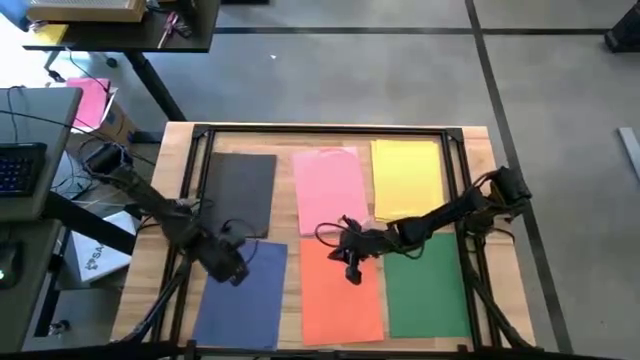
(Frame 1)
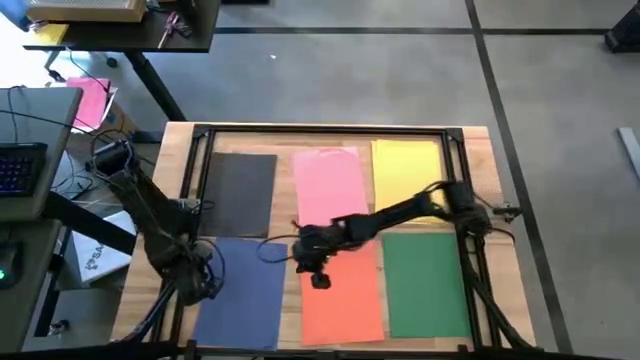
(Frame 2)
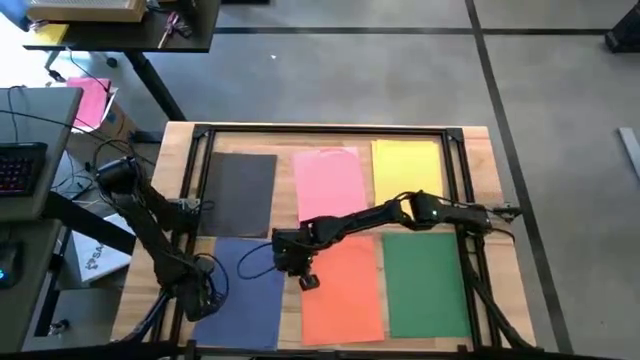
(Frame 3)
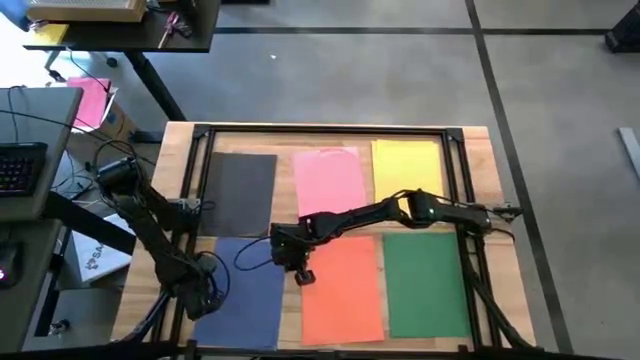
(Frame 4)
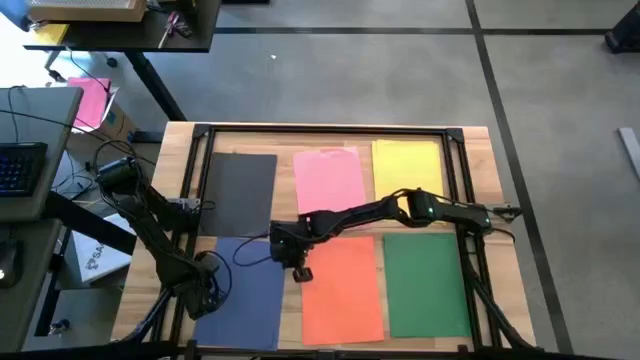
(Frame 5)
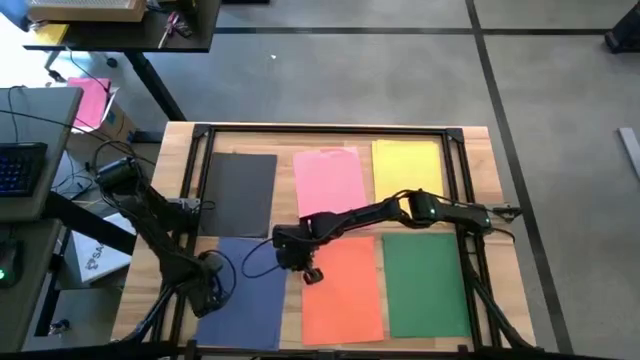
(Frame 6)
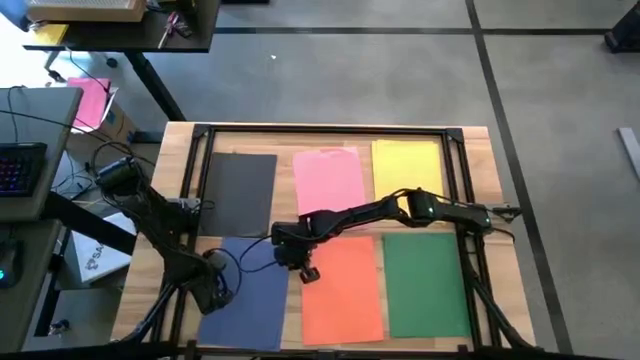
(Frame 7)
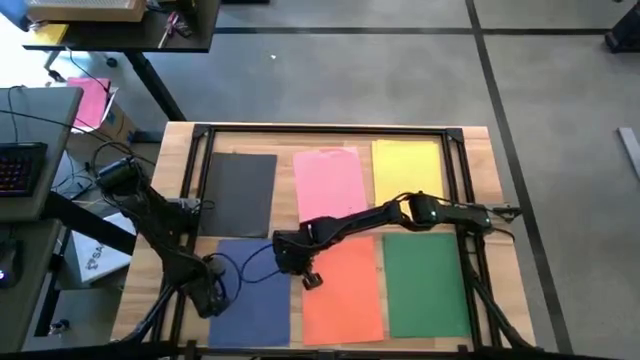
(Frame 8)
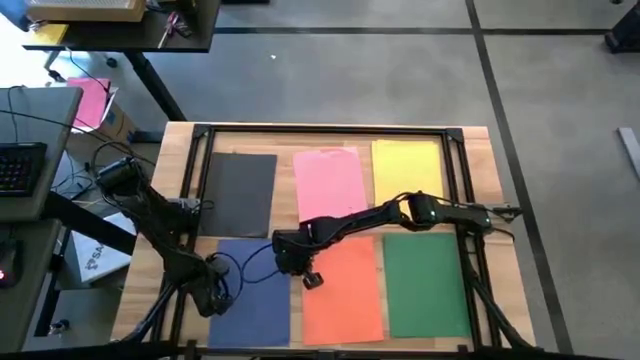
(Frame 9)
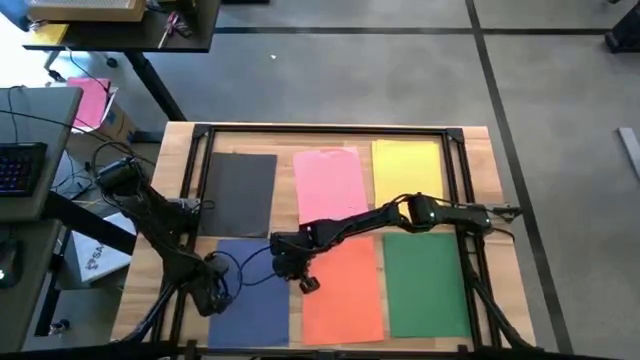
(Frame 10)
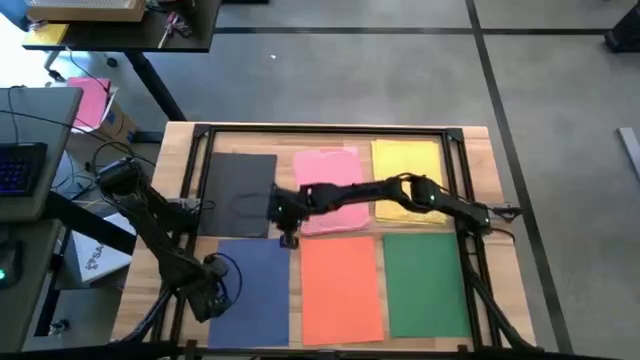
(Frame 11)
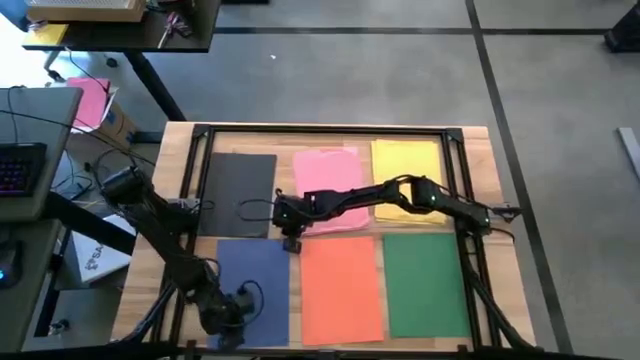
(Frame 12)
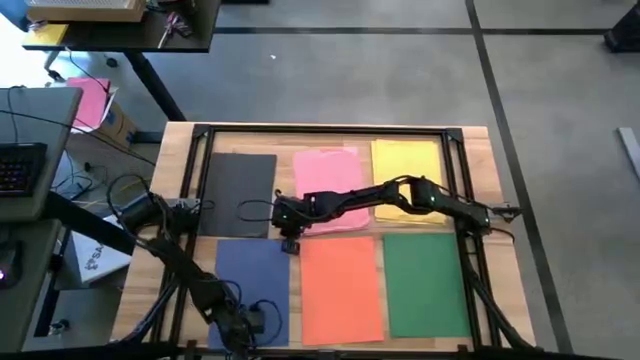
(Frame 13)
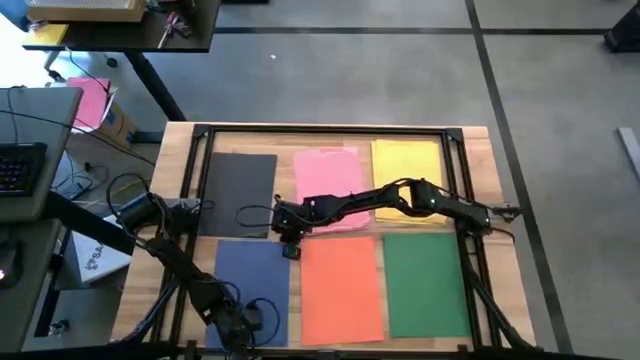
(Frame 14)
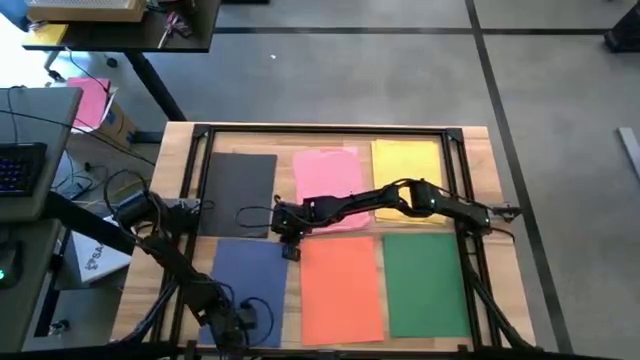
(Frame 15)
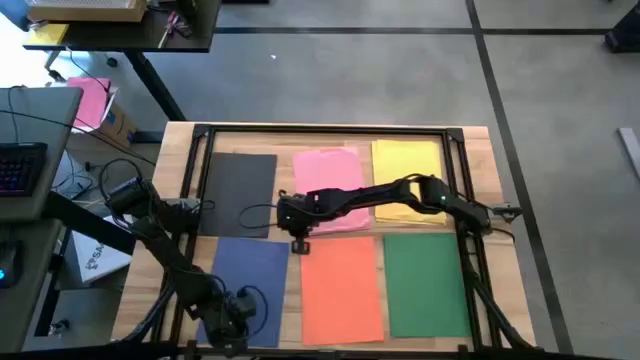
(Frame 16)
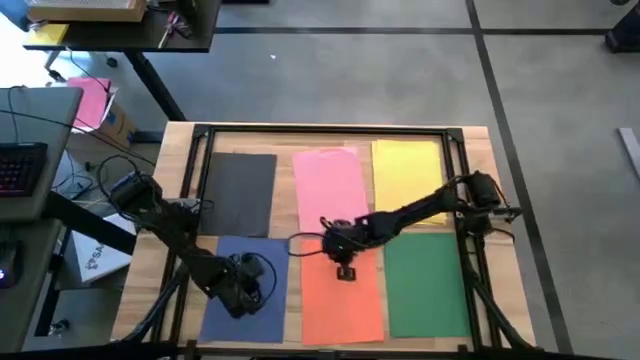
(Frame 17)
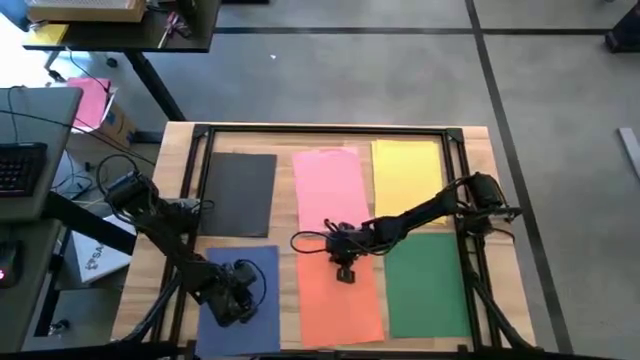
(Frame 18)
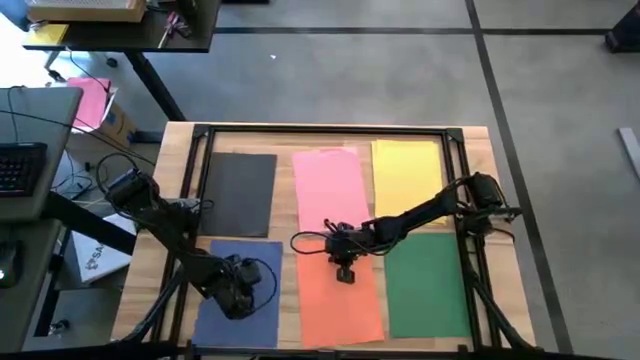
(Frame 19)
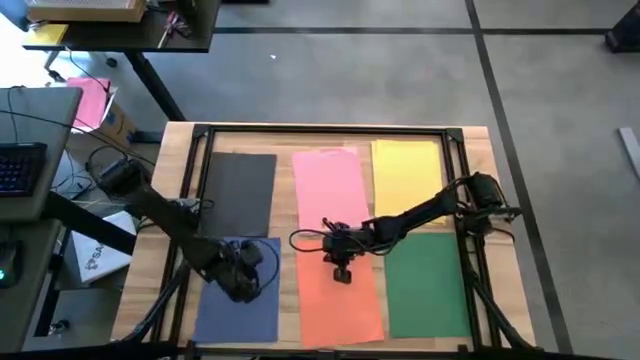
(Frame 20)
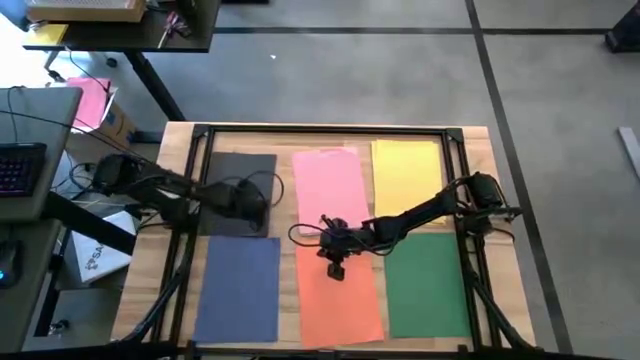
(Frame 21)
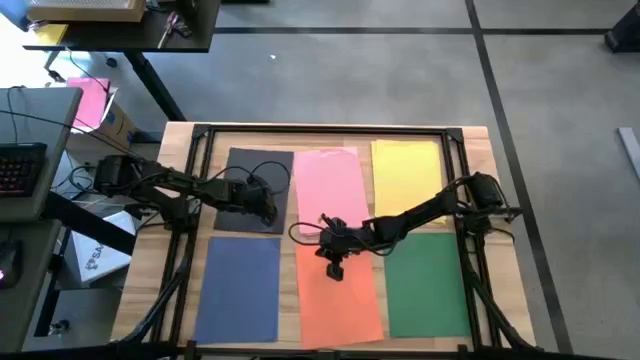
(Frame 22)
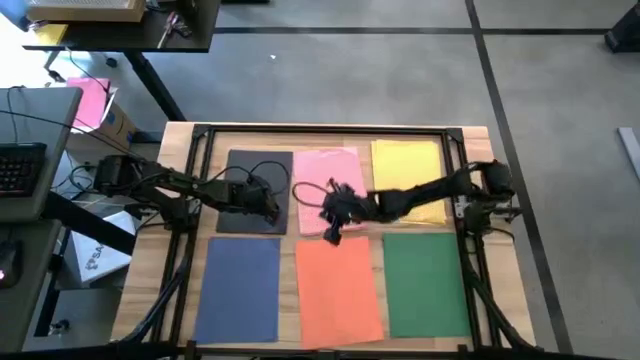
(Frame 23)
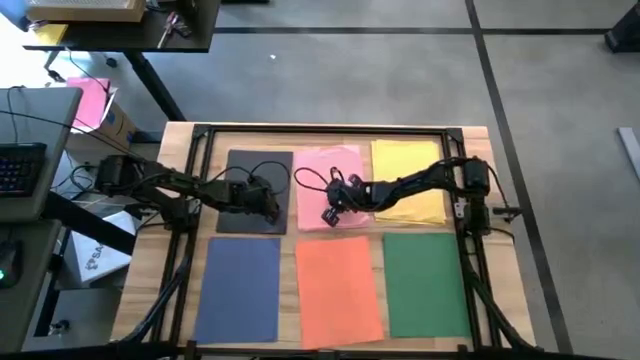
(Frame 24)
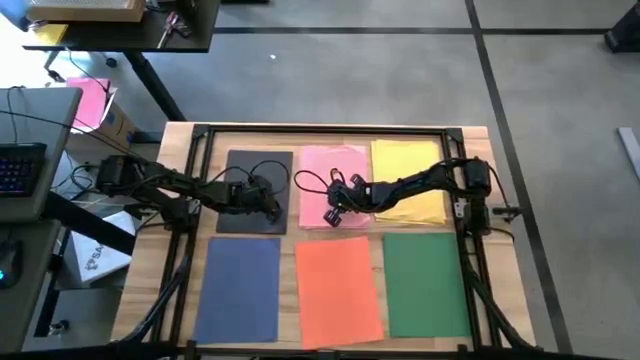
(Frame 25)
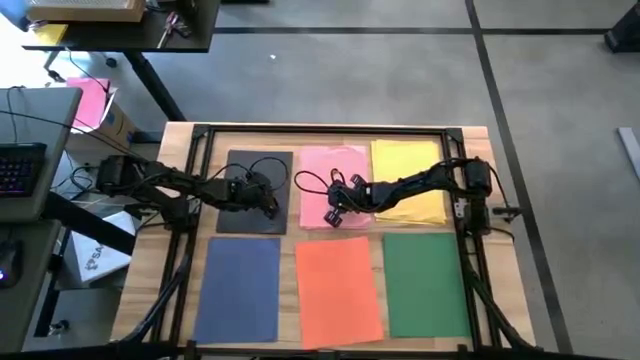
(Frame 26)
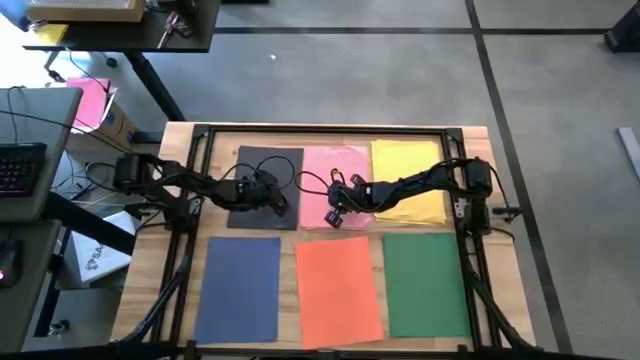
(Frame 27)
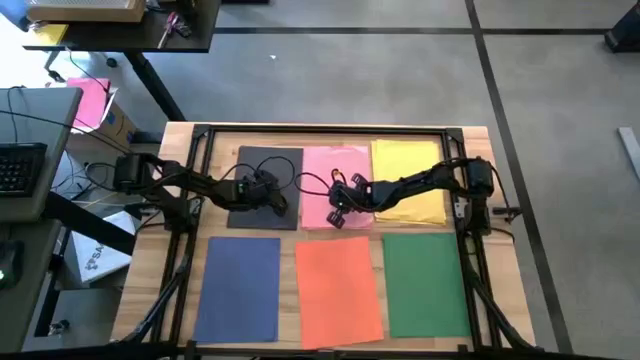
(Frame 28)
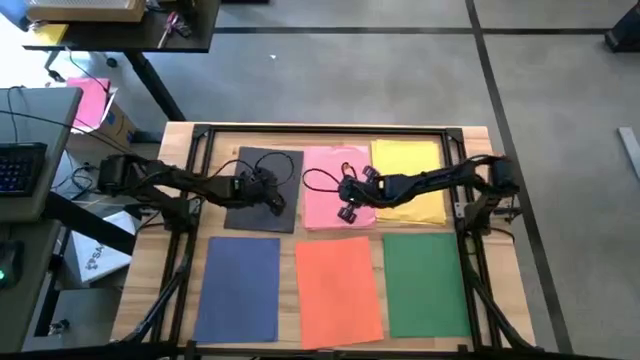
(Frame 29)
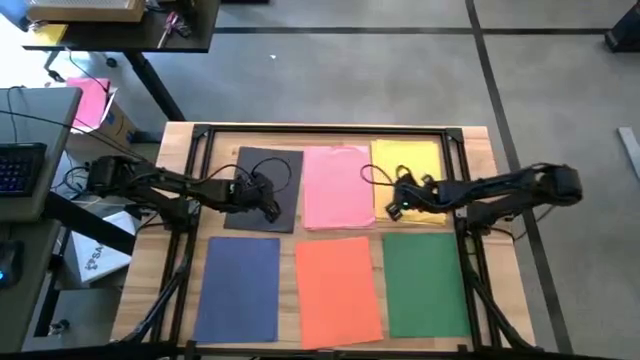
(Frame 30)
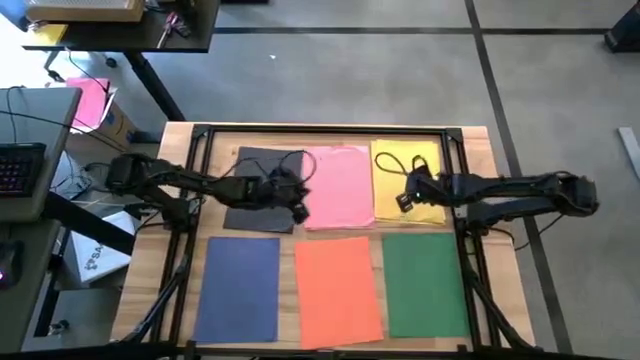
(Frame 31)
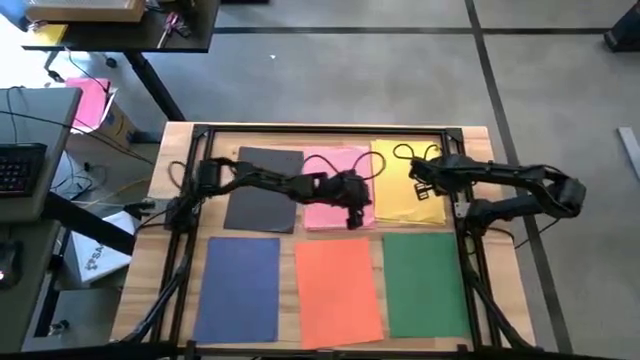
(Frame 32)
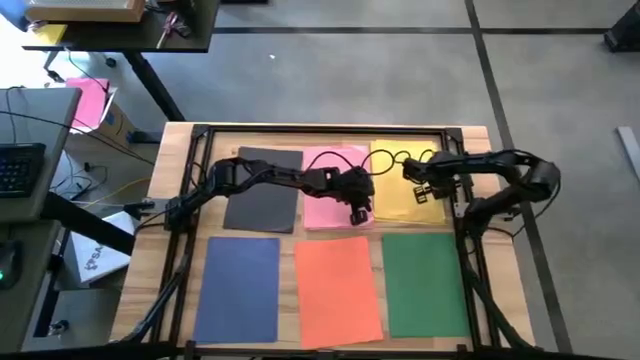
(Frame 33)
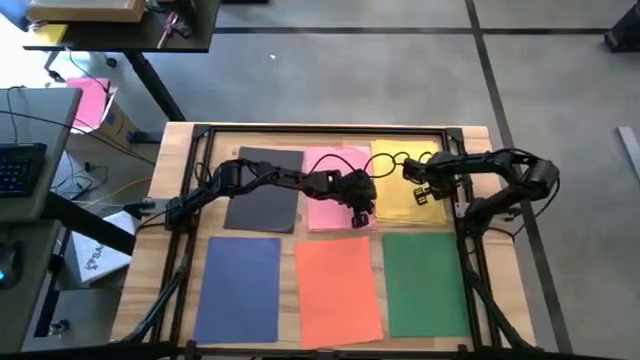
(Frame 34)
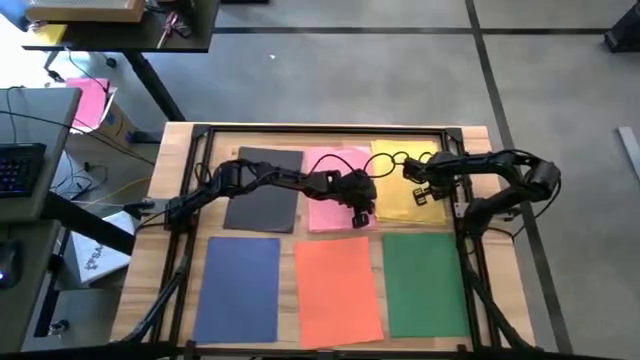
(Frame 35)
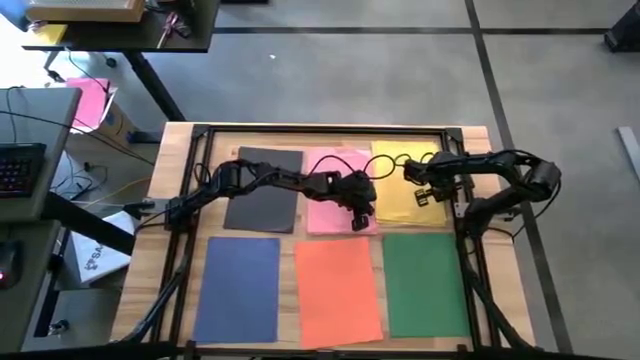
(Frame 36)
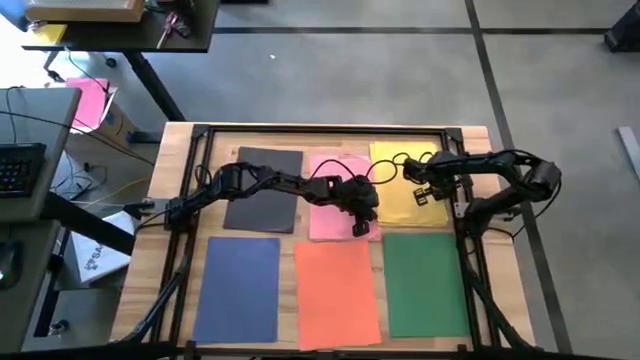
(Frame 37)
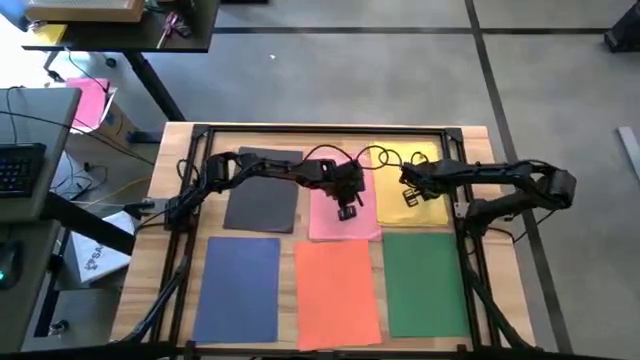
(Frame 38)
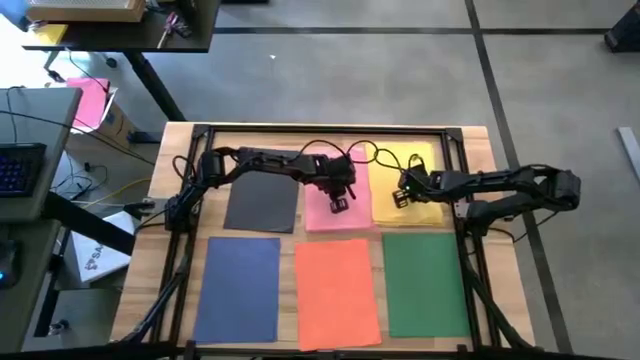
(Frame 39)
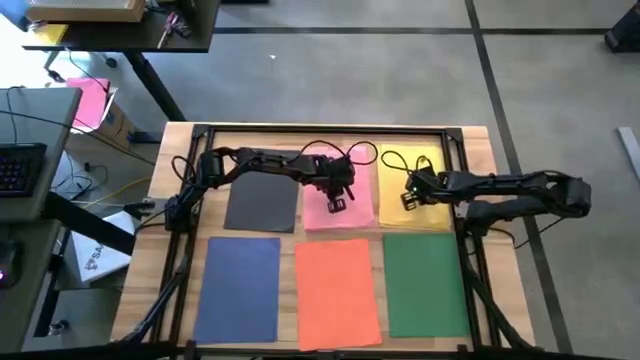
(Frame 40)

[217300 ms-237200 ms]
Task: Organize paper
Adjust the colored papers

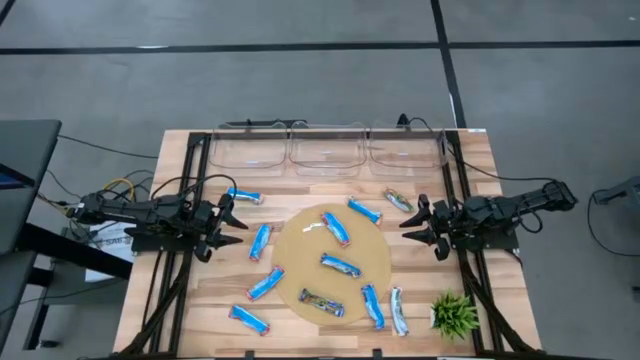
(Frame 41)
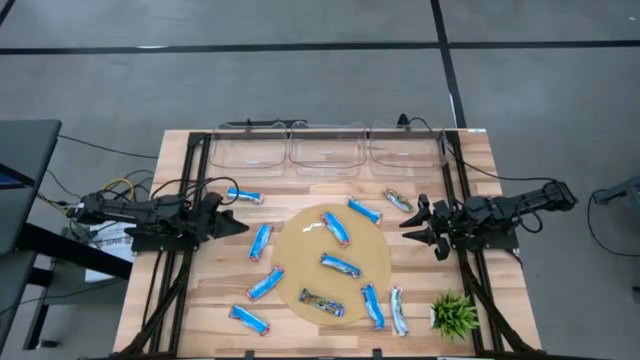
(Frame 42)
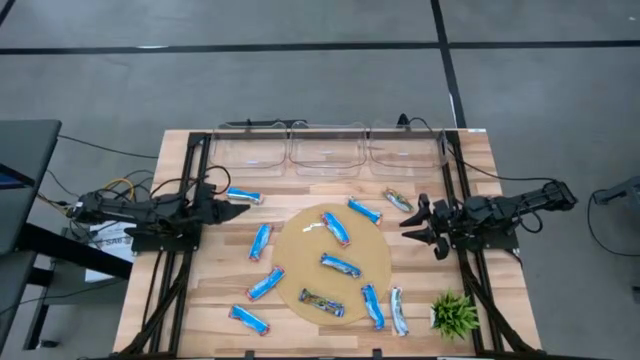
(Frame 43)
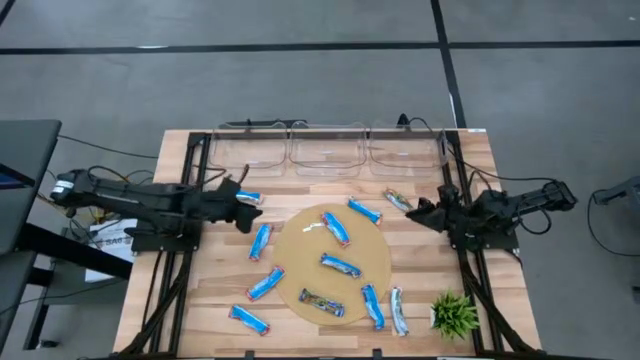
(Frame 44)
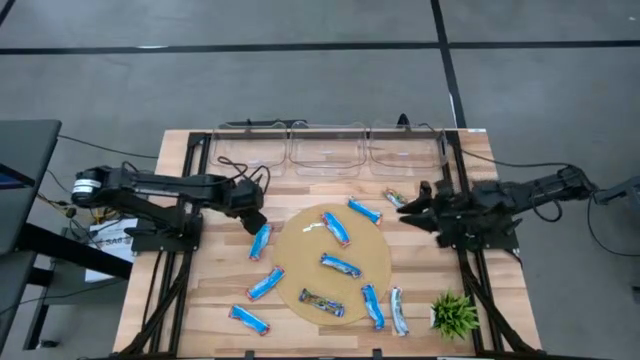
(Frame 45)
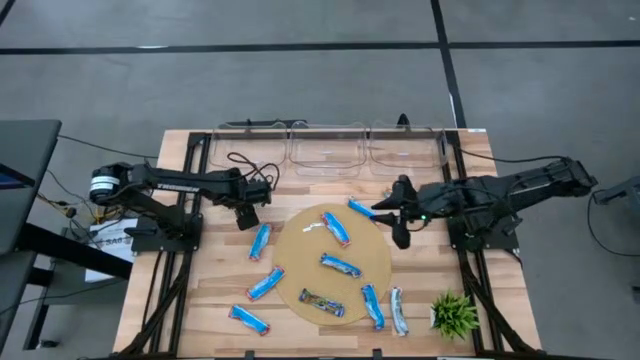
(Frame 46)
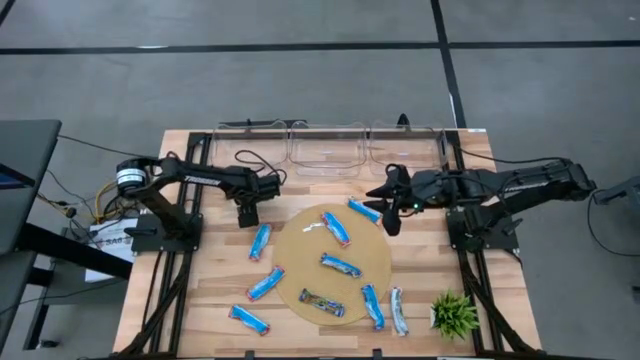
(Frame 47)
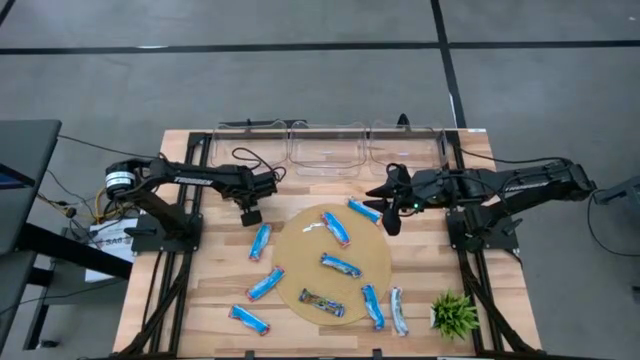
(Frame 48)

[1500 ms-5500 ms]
Task: Pick and place Granola Bars by type
Put the yellow granola bar into the top left transparent bin
